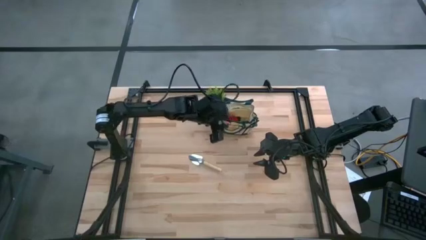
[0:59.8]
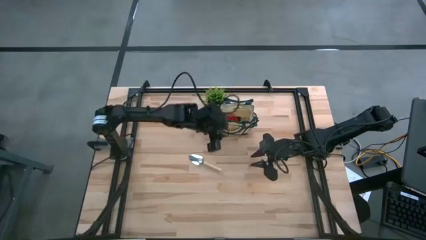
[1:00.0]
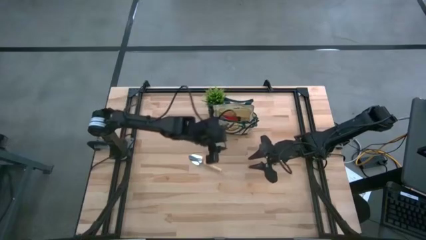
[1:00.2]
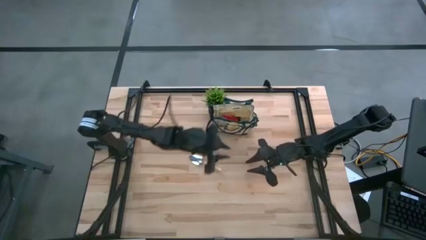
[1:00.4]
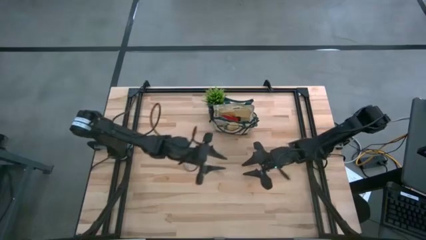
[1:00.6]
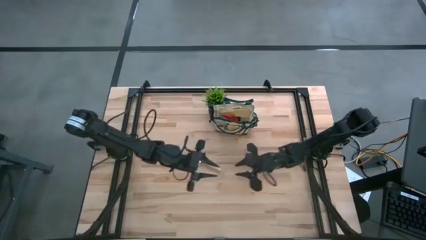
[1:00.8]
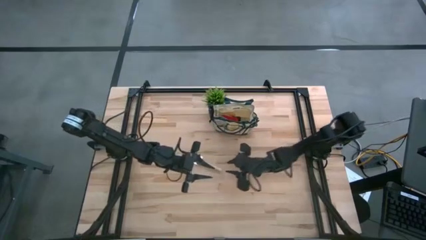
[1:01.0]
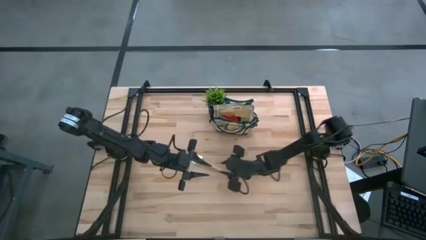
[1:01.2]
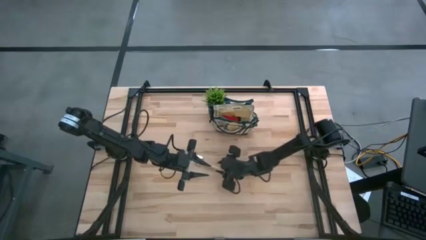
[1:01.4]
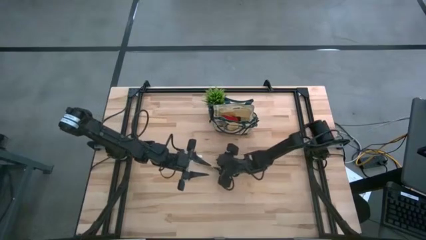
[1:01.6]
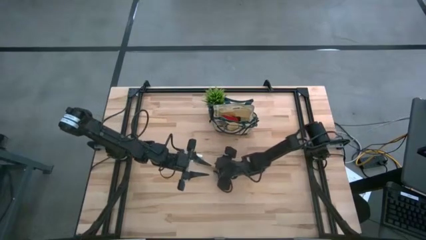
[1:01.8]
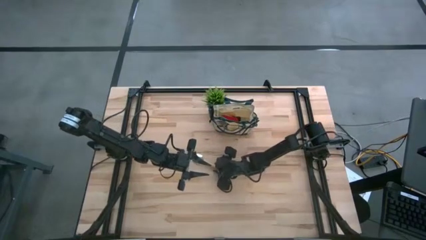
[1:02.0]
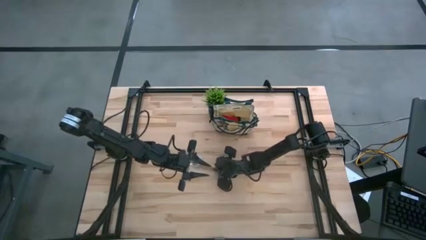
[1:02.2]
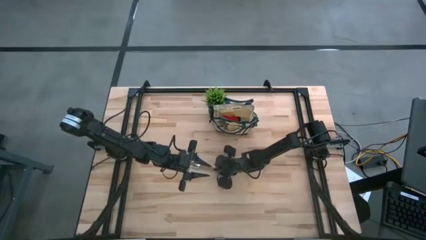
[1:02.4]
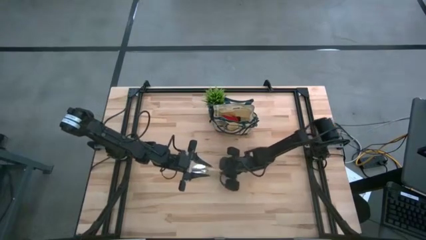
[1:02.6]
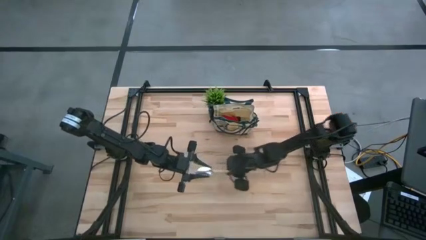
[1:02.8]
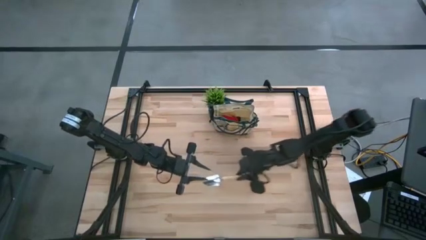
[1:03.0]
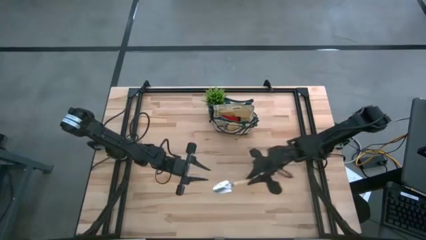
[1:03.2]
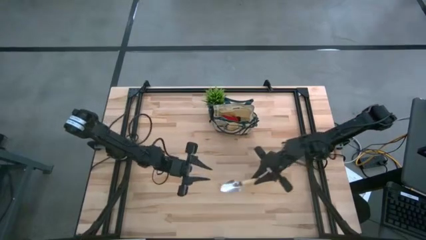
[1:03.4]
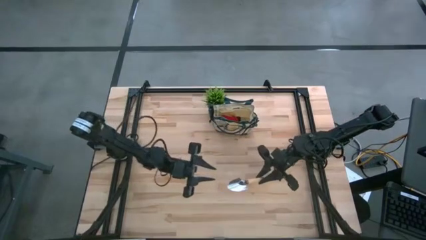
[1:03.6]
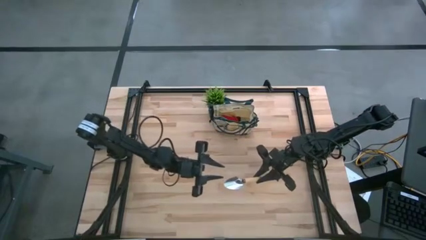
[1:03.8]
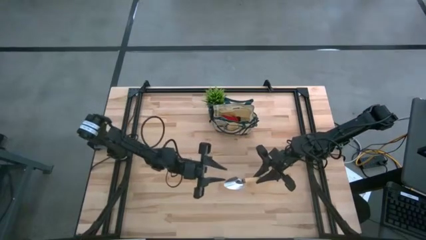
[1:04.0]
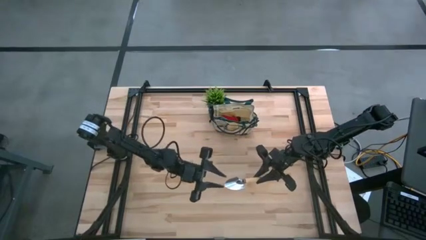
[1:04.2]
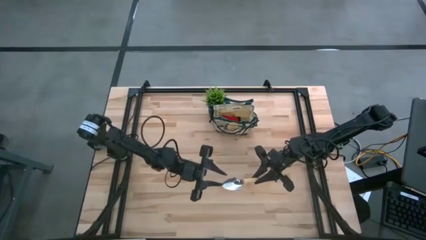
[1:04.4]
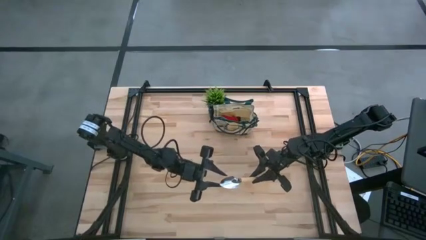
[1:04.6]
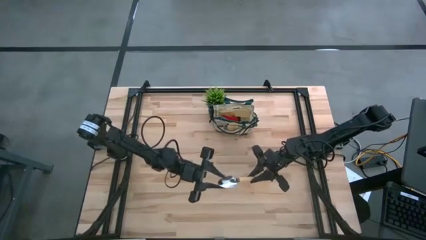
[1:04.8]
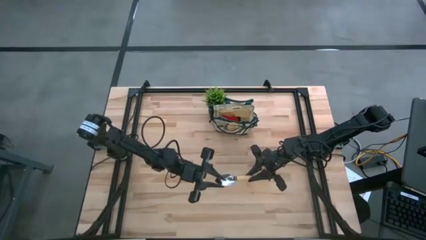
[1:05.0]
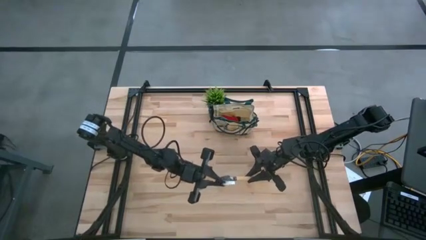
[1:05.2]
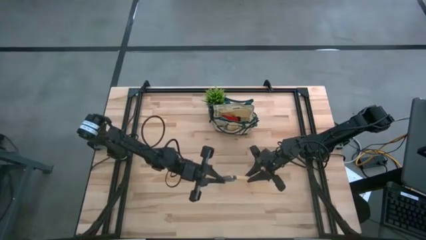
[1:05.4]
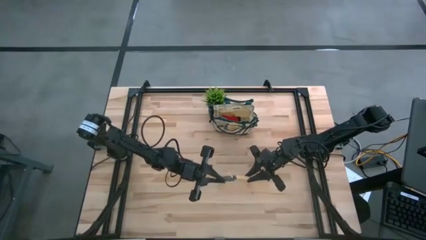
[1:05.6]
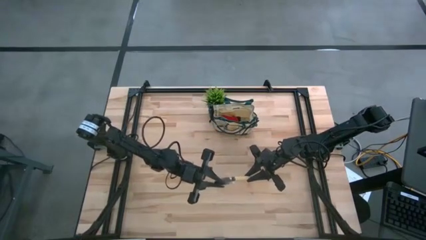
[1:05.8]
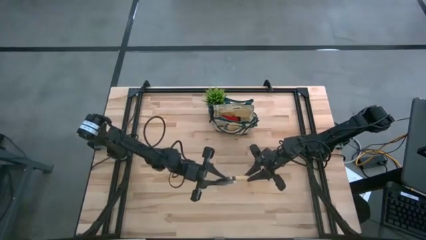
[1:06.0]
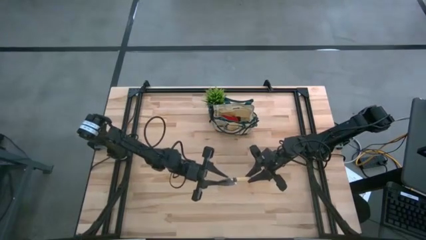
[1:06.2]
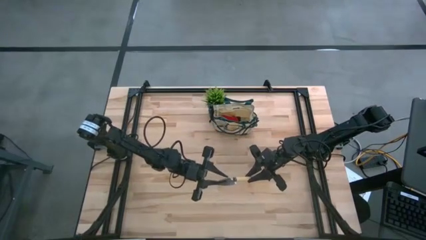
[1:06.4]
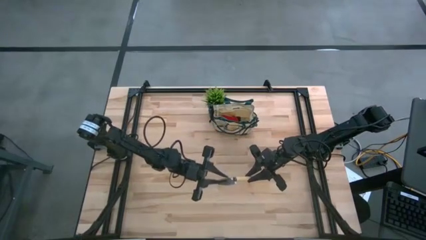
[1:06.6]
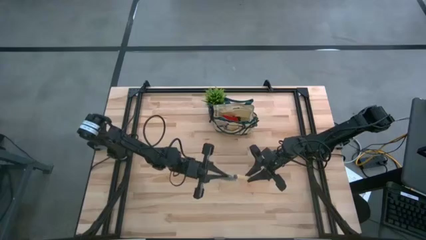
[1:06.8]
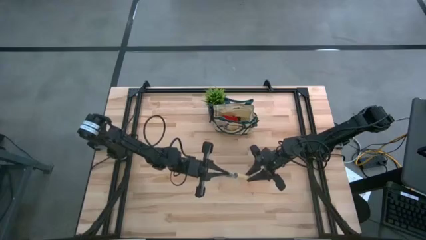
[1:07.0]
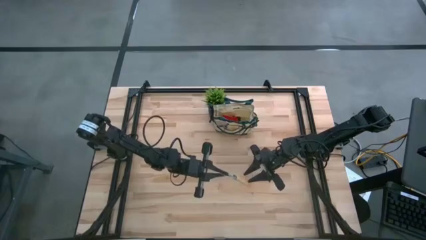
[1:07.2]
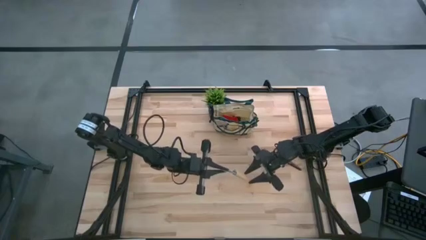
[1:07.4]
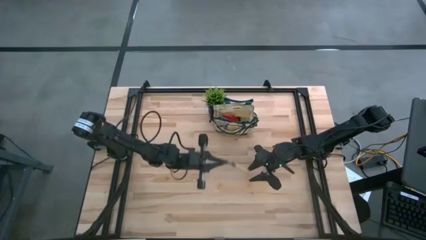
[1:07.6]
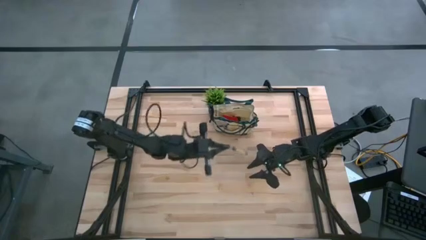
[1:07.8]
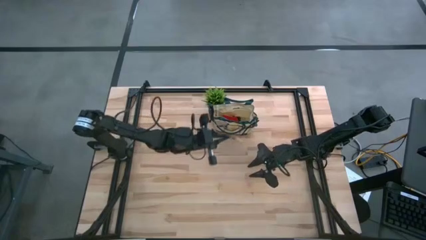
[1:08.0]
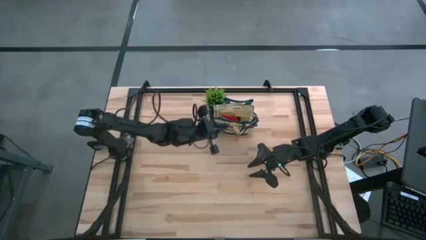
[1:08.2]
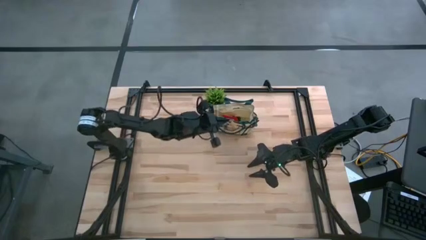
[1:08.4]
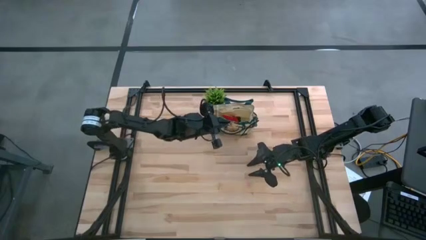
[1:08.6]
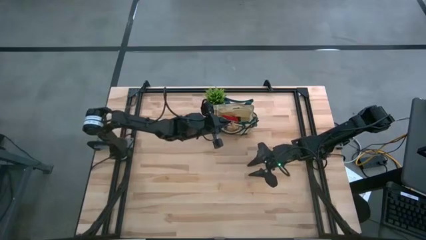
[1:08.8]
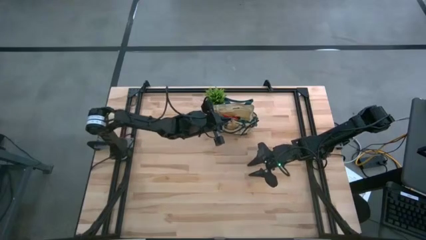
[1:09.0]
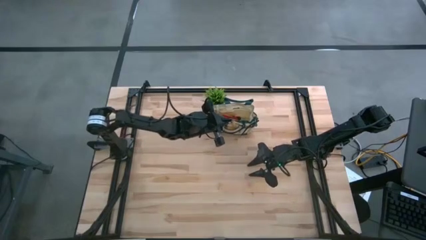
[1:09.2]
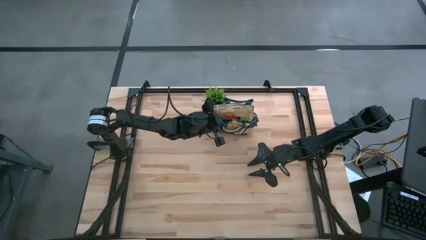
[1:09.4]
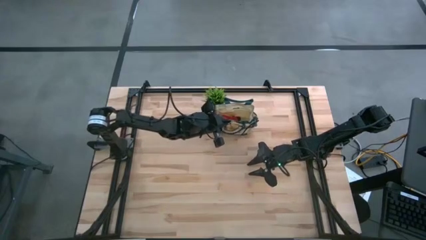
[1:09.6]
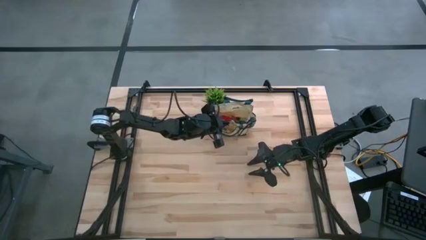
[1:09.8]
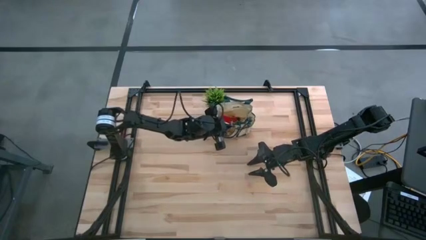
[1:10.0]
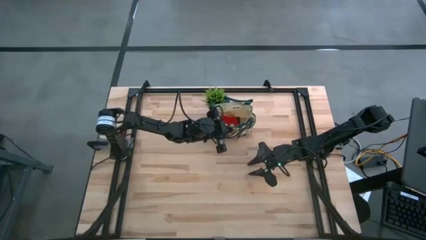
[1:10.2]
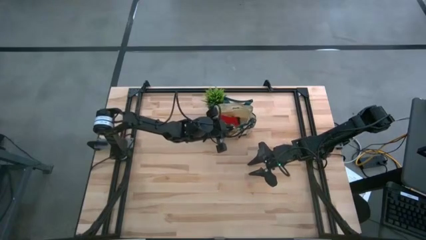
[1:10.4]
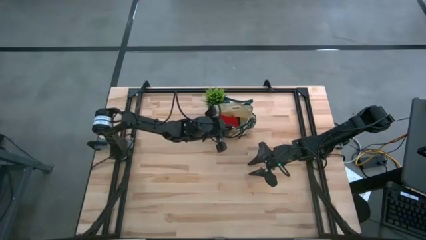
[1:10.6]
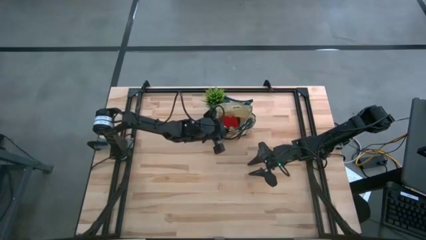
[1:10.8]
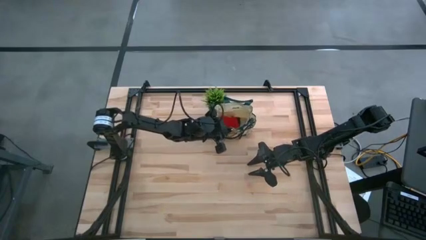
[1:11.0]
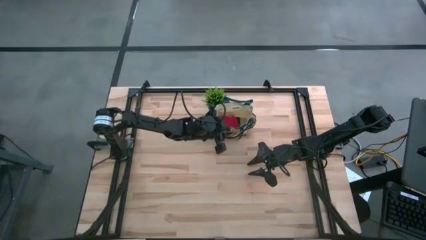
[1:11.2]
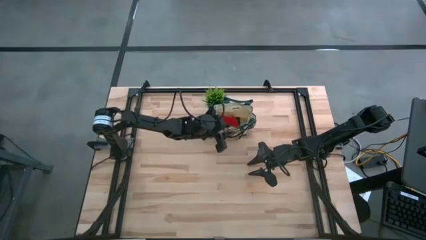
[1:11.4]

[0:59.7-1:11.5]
Task: Pick & Place Garden tools in Gardening bag
Put the brown trowel into the gardening bag

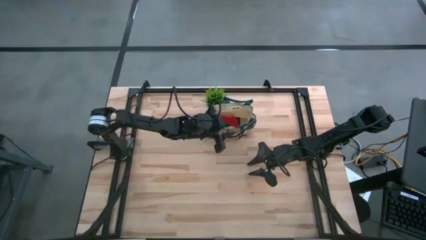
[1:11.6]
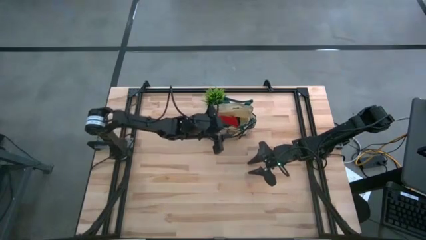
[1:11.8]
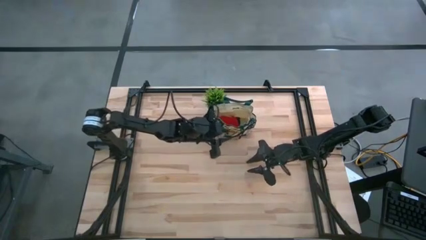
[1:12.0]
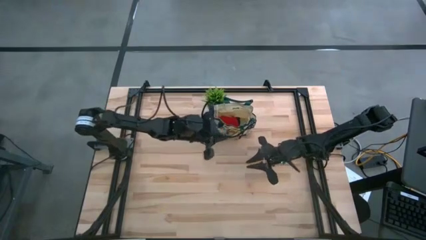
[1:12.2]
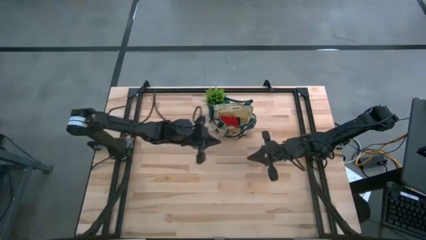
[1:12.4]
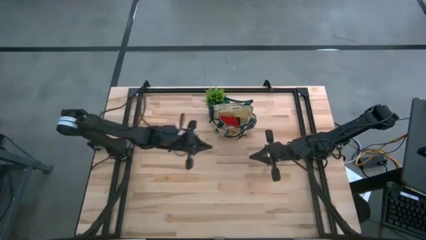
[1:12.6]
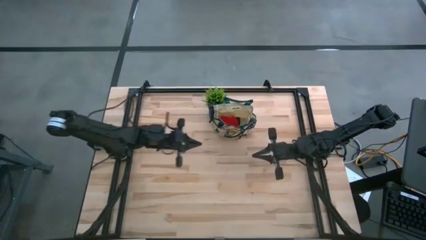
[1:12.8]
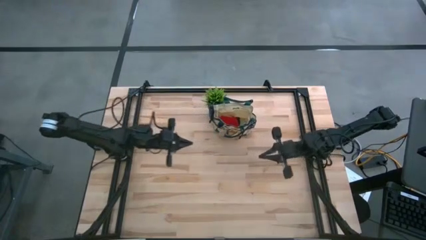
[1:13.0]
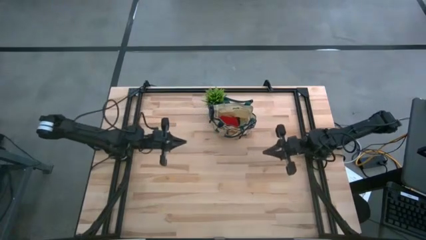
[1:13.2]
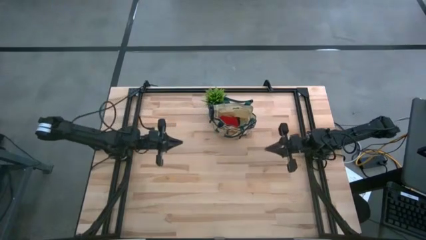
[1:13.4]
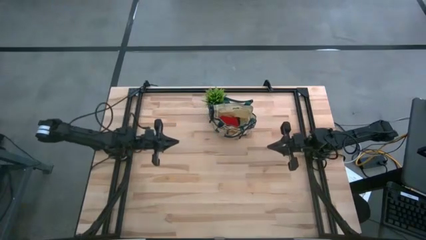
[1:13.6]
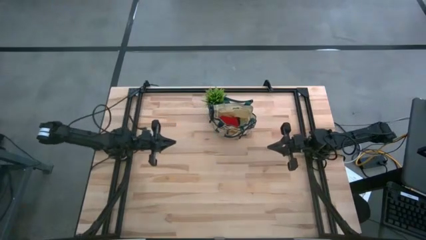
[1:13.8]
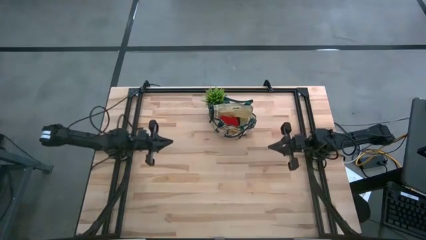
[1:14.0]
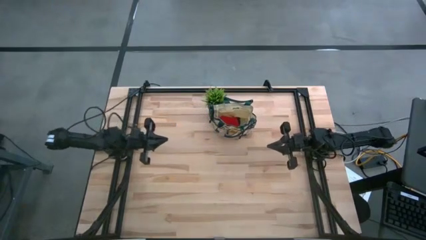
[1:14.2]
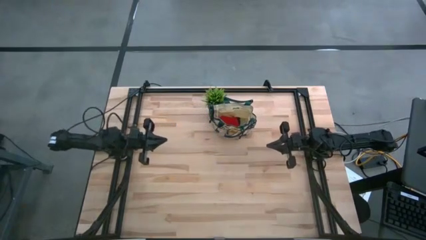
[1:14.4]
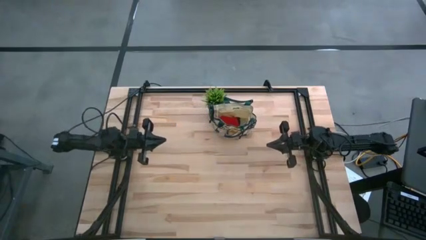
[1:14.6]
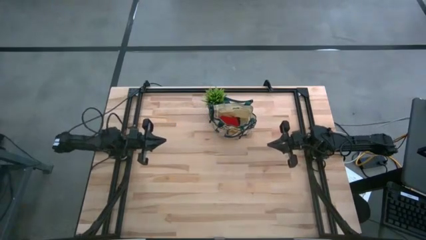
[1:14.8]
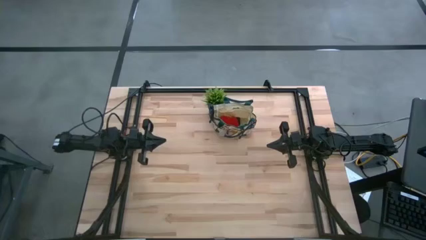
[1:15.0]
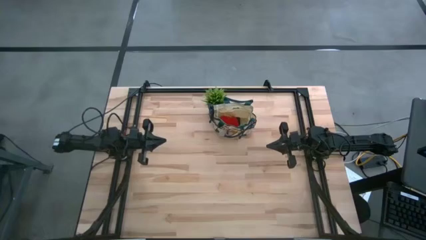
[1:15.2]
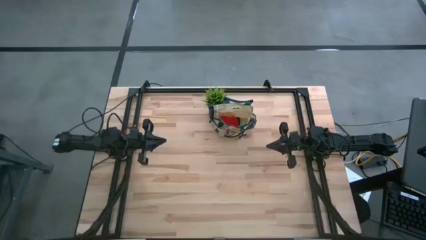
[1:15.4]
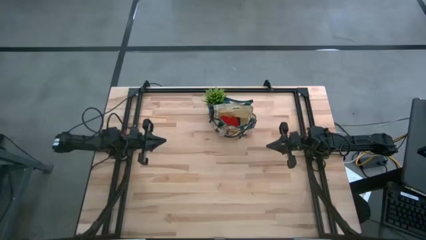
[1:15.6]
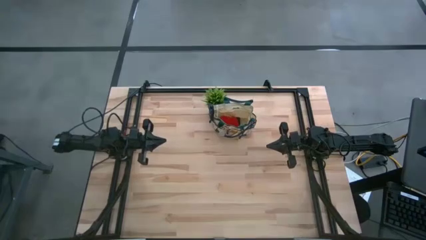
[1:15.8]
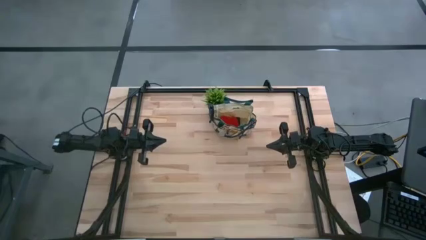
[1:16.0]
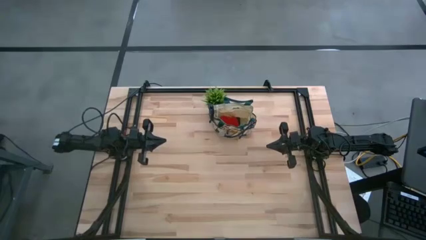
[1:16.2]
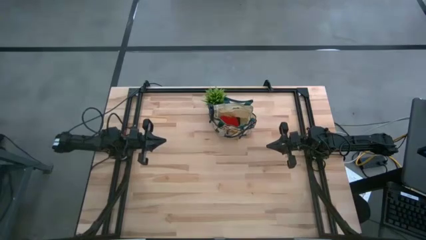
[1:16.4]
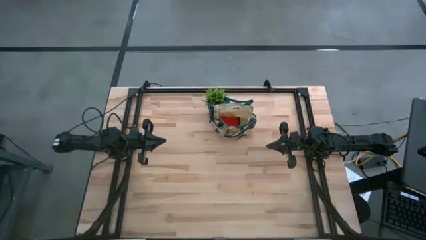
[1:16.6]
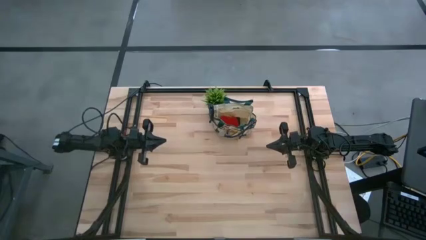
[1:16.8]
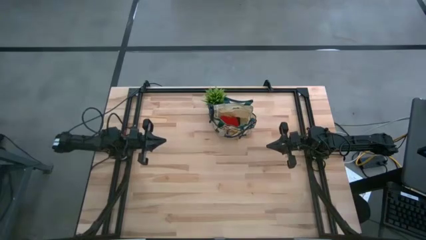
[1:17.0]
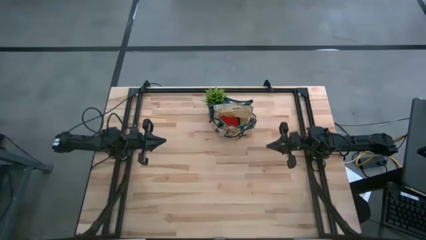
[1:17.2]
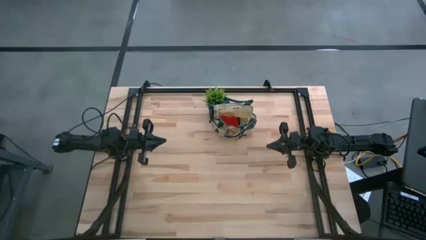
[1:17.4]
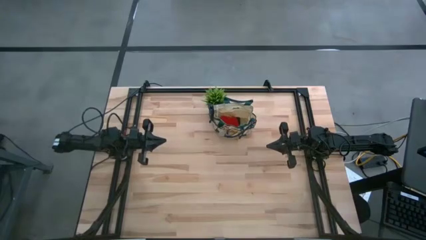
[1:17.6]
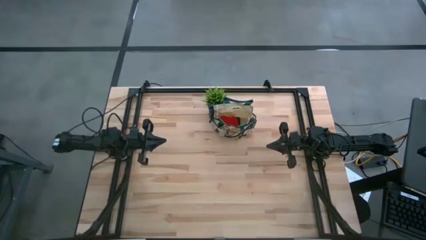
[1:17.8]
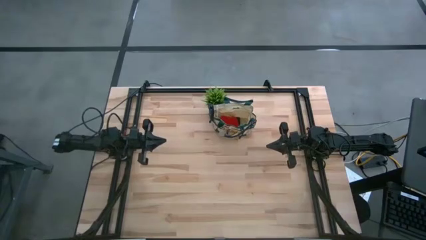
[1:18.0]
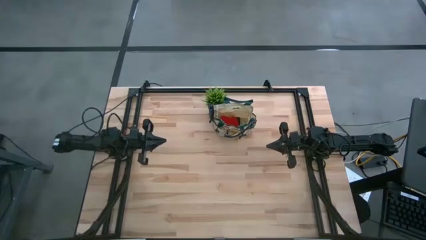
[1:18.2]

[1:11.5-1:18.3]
Return to Home Position
